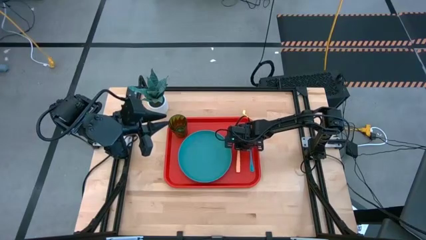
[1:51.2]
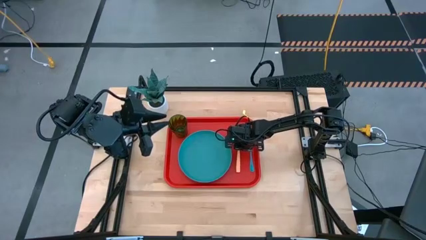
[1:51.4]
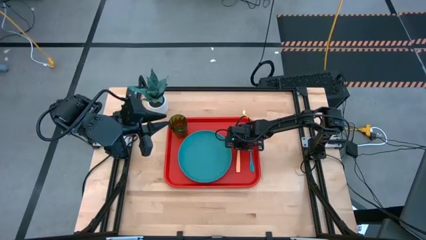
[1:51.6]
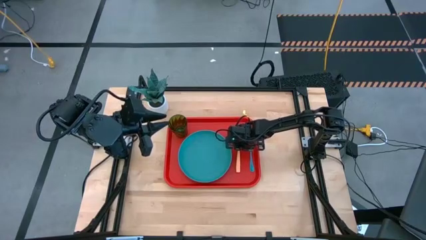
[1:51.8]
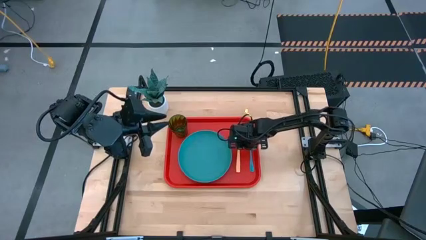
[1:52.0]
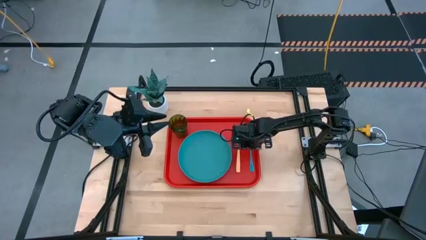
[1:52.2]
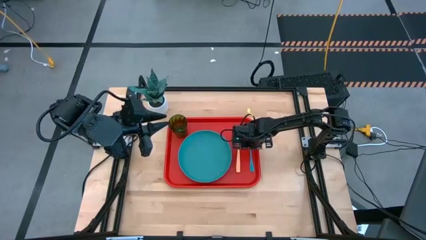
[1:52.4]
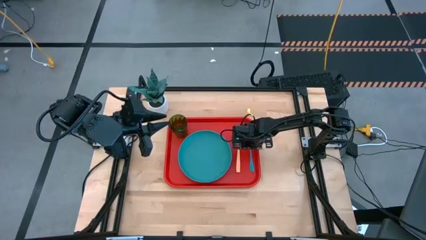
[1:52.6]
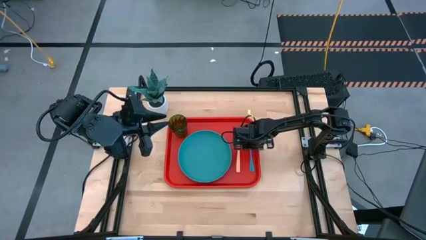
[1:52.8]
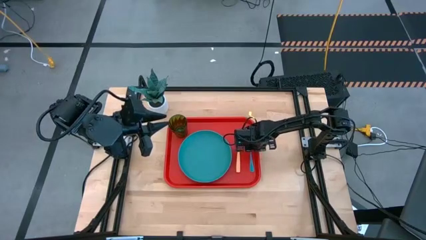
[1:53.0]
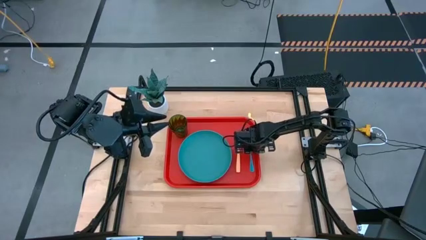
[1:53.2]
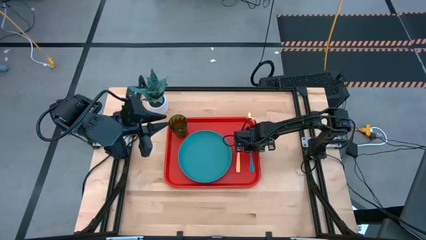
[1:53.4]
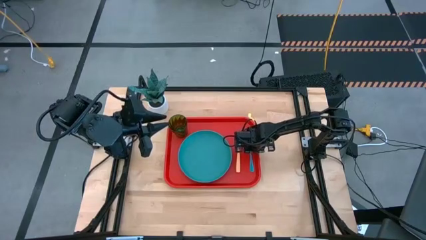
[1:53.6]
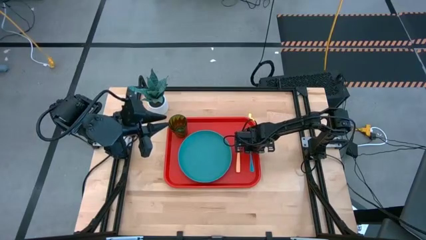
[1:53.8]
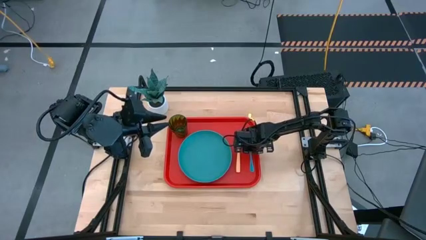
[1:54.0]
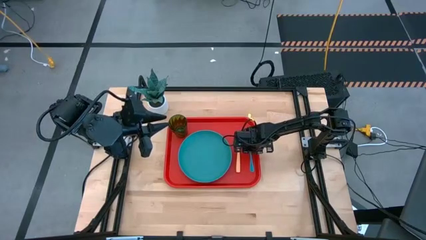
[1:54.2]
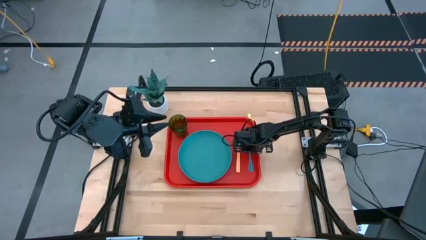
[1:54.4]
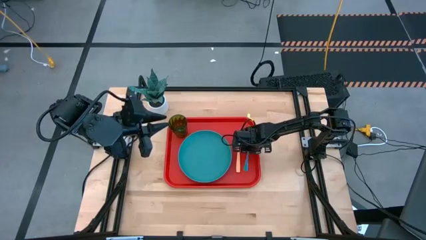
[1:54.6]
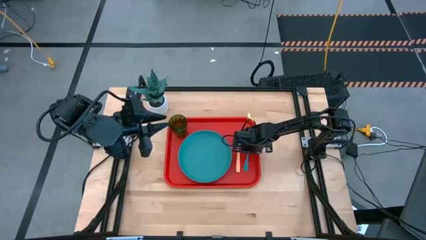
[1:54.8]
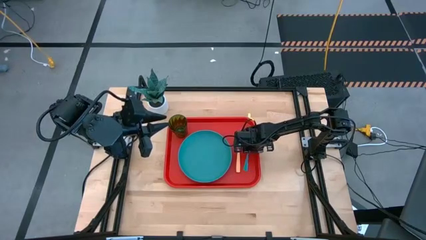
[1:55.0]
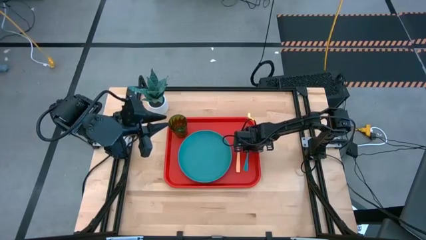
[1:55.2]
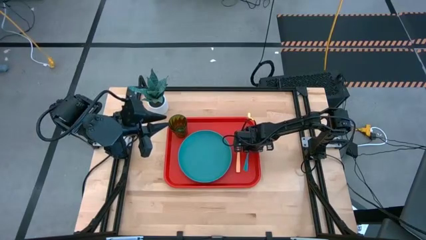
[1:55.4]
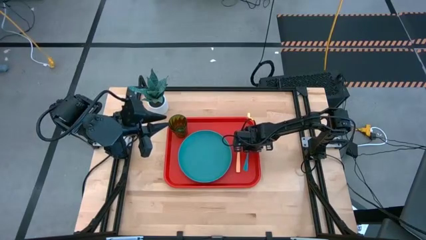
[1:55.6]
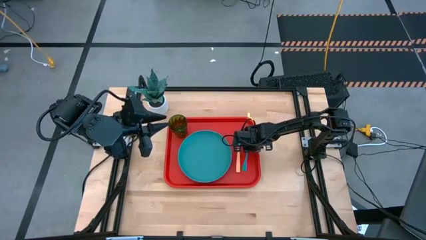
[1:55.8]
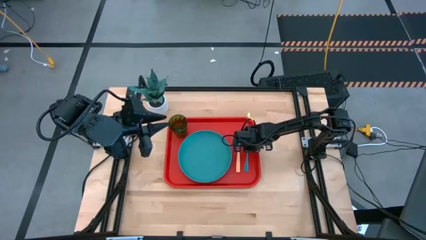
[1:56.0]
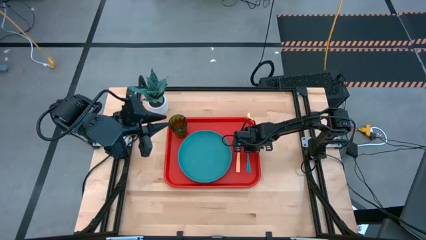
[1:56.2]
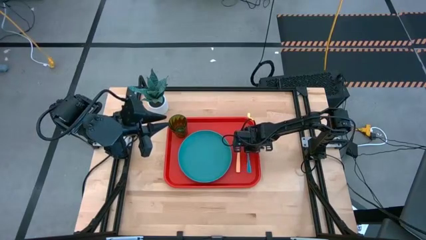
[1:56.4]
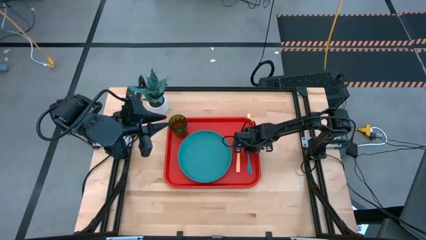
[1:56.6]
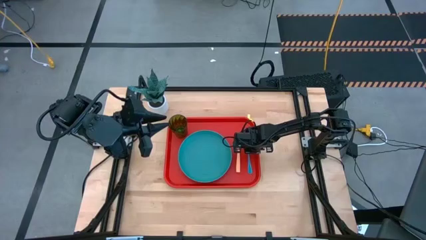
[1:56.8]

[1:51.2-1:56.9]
Task: Pick and place plate/cup/fork/spoon on tray
Adjust the blue spoon

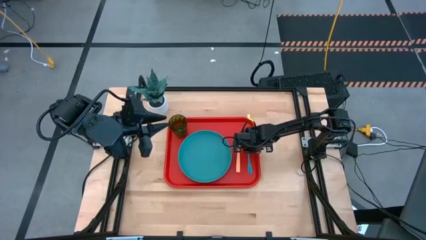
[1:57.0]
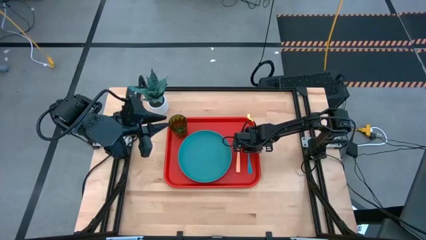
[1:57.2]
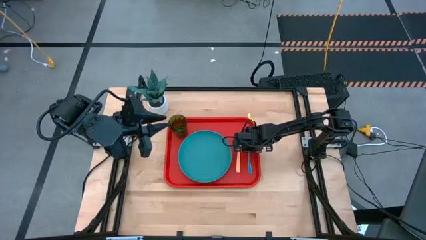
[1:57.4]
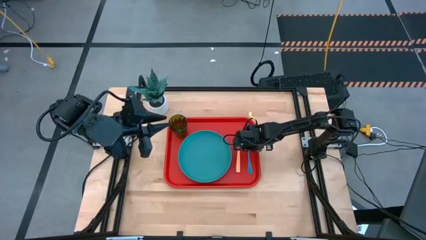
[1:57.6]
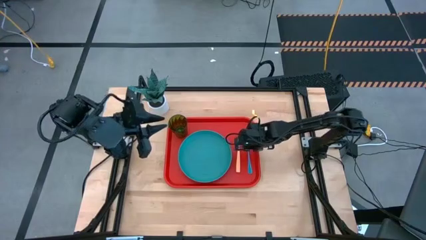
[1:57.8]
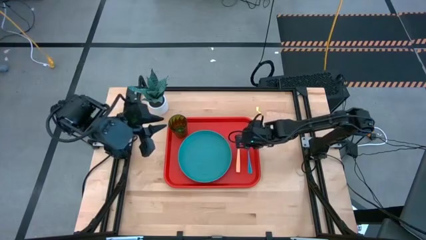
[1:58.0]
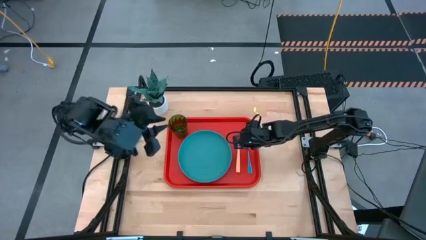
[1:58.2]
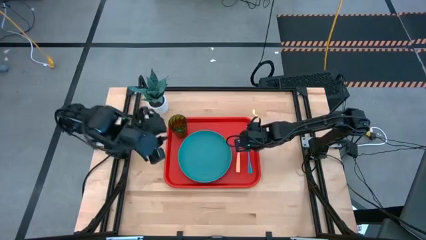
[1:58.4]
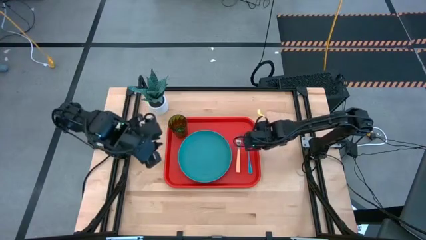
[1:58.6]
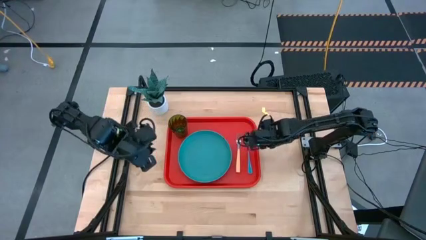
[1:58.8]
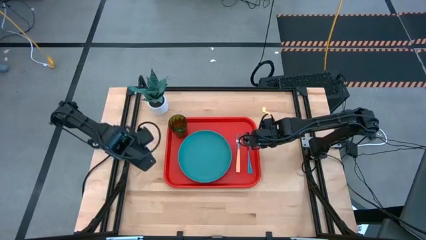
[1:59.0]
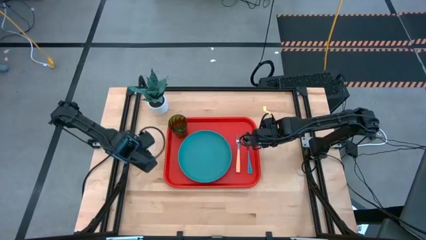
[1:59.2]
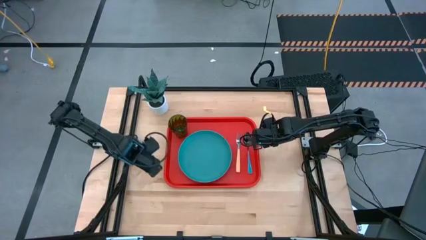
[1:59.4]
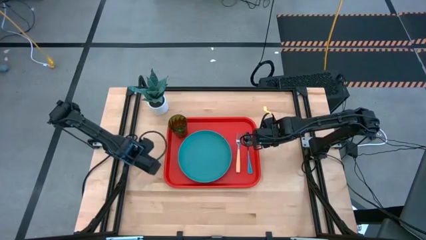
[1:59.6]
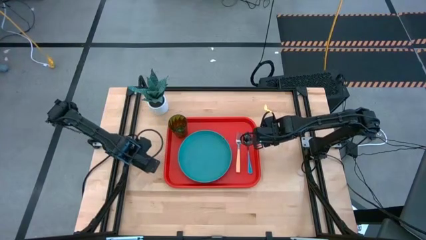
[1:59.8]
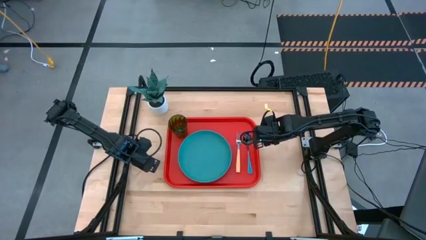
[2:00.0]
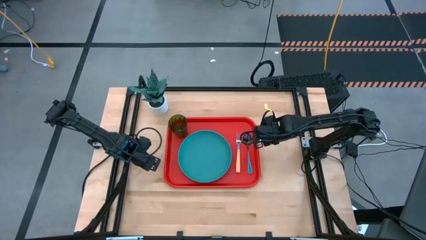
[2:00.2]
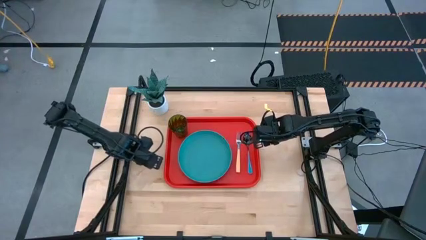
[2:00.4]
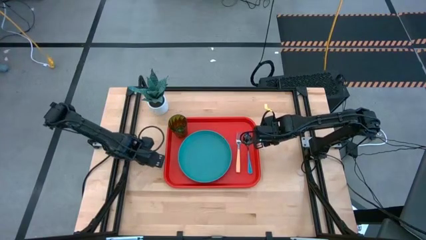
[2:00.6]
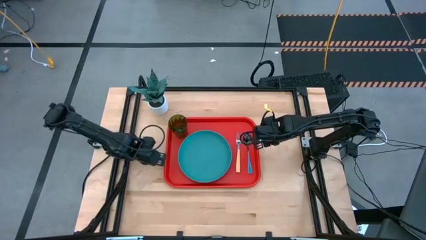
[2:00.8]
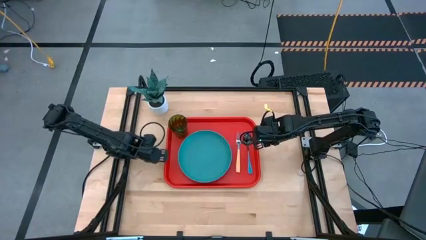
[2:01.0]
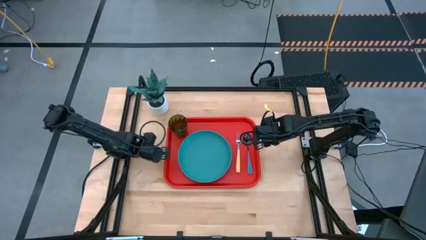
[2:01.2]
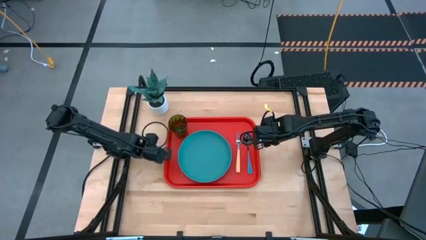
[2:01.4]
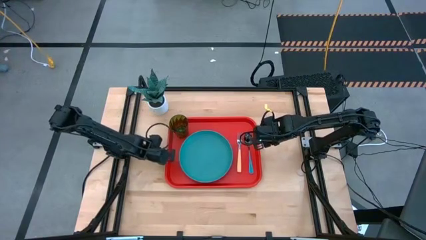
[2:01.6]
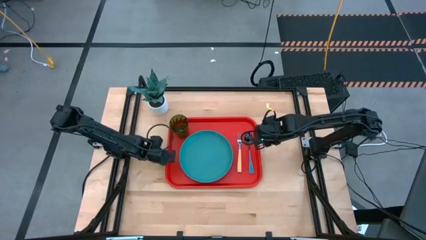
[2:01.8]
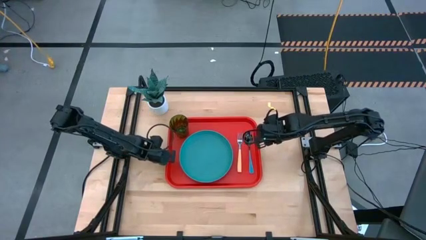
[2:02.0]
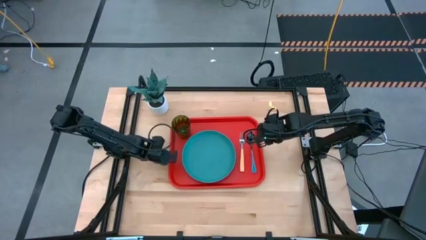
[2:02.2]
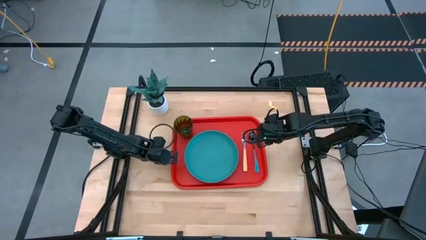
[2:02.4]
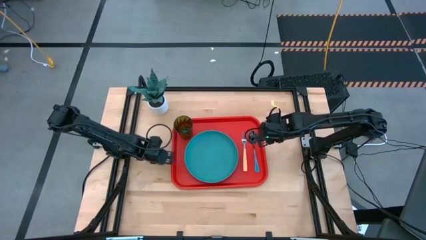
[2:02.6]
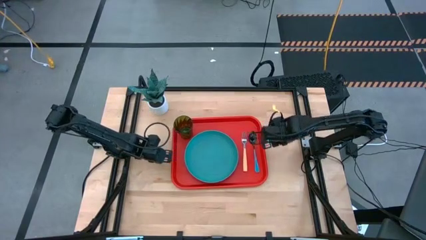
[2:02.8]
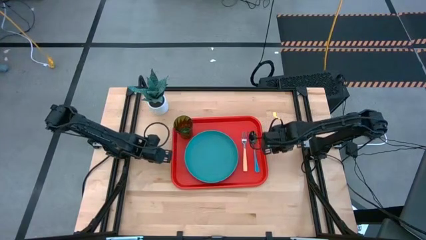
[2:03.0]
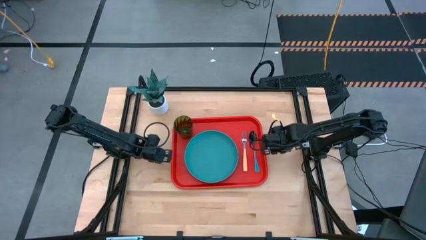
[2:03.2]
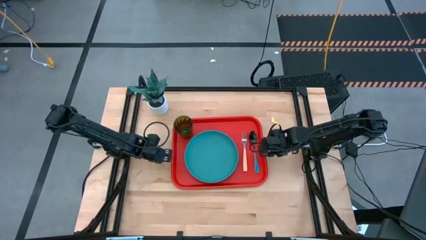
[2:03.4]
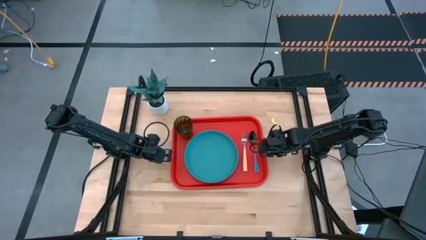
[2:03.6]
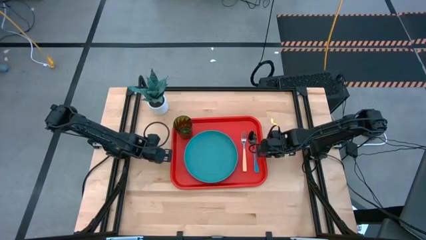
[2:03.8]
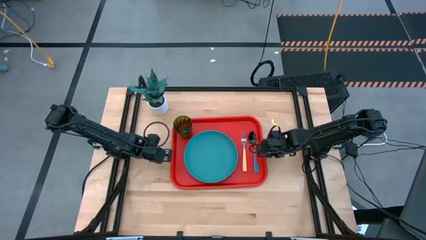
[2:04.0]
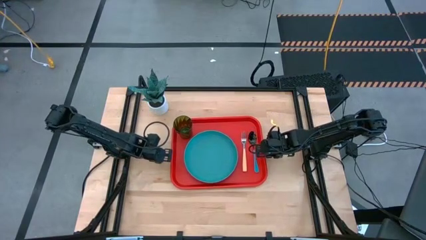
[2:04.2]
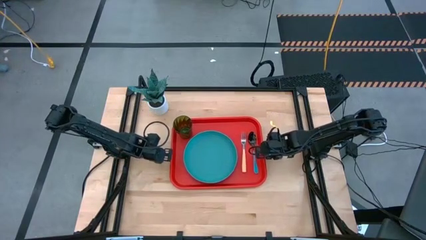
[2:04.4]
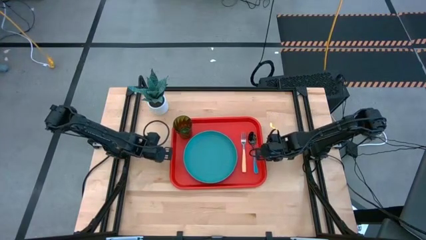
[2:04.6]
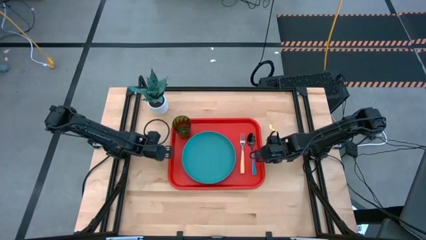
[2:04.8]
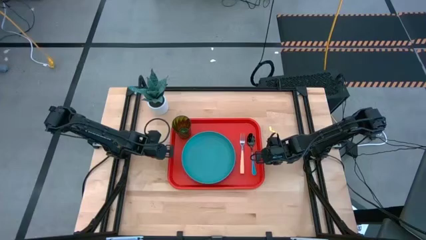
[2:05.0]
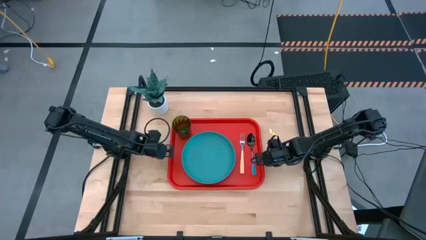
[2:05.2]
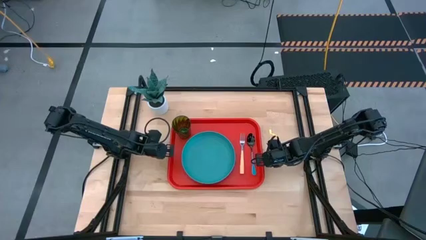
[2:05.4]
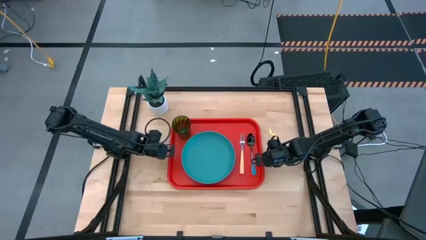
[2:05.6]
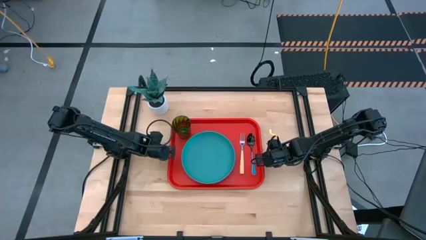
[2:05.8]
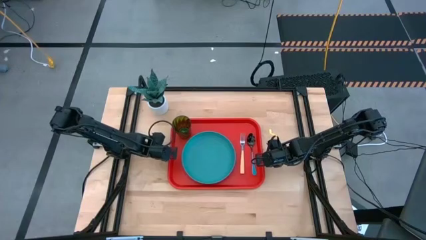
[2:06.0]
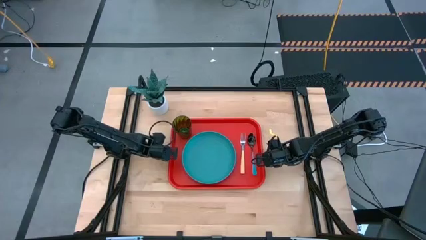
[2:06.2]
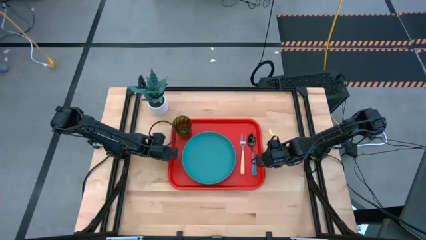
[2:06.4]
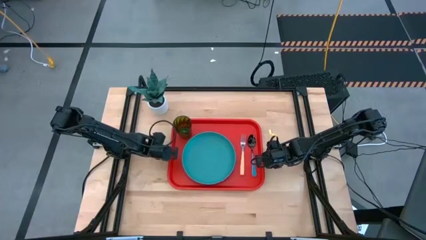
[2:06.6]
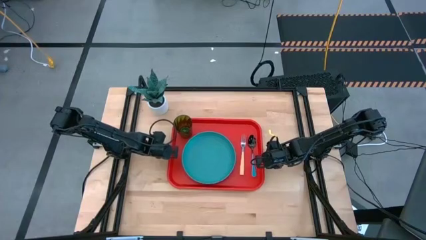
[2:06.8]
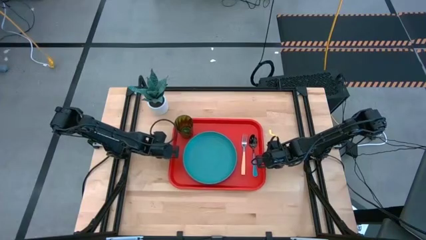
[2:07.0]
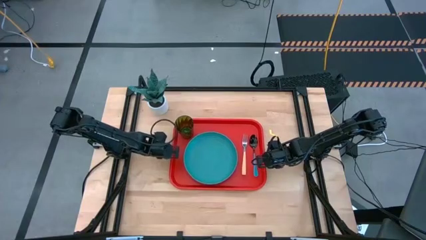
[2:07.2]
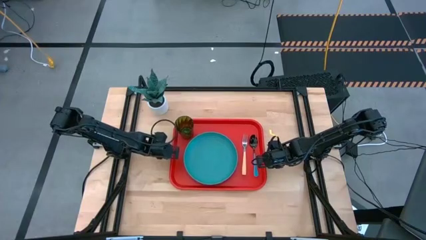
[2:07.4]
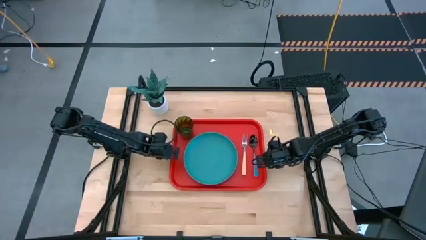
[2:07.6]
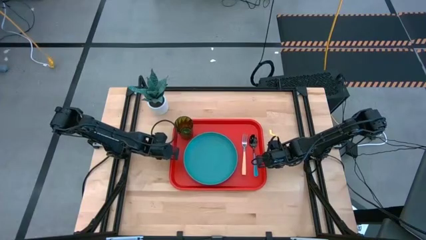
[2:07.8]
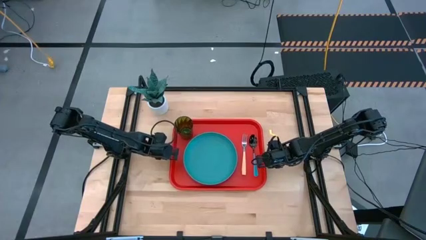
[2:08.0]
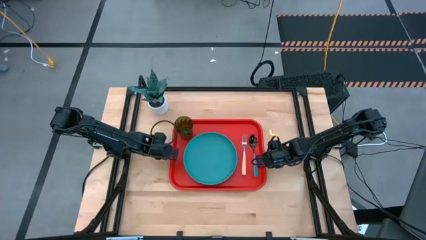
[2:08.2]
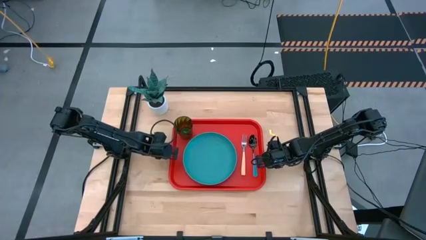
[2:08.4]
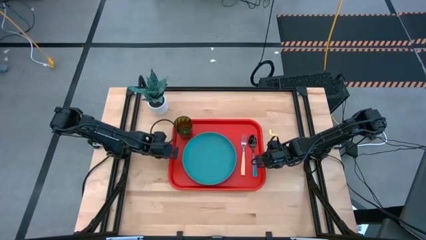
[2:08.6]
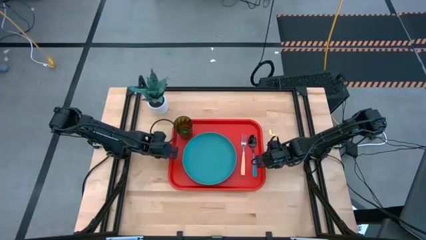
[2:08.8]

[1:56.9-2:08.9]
Adjust the red tray
